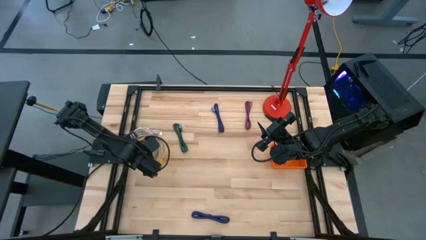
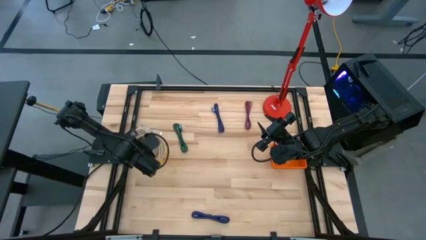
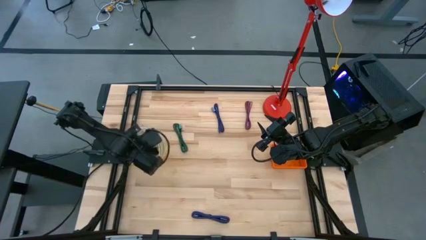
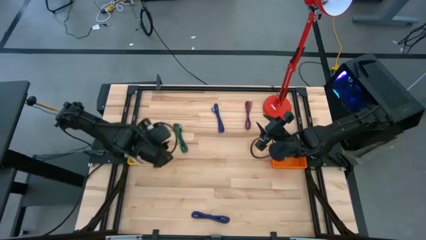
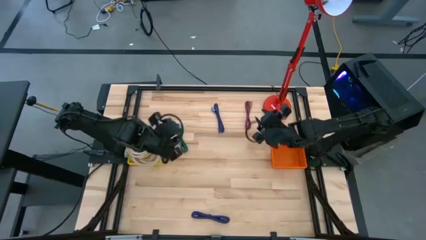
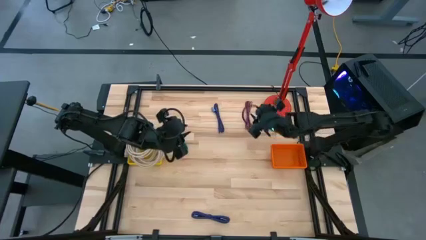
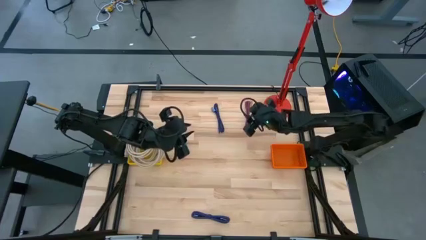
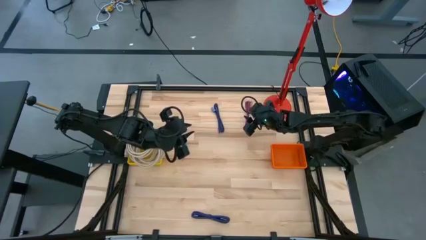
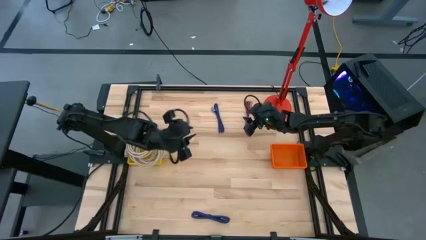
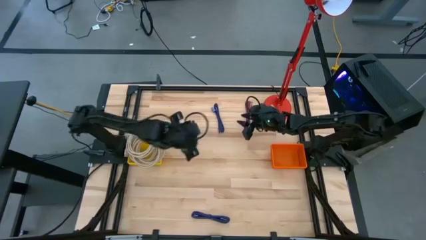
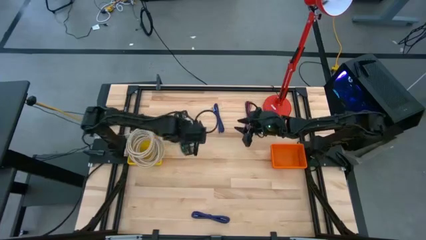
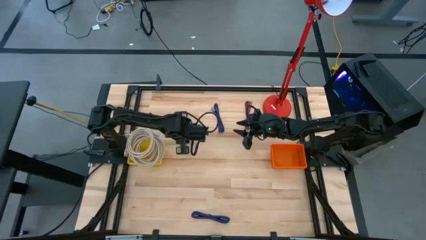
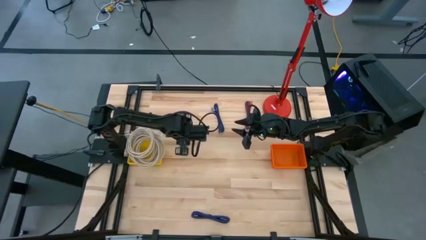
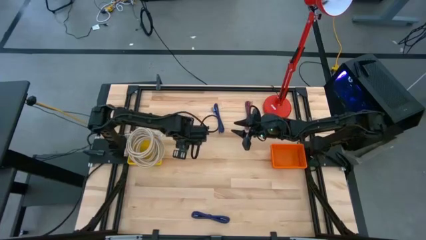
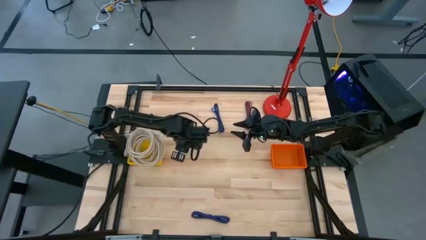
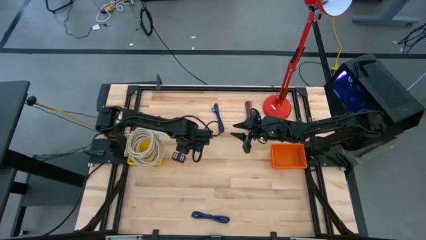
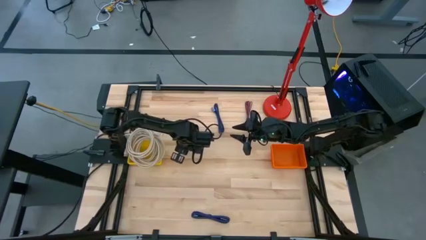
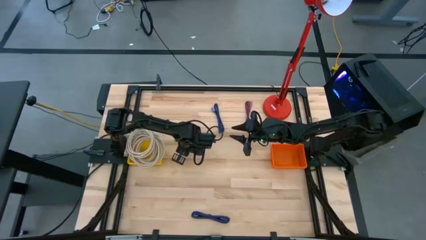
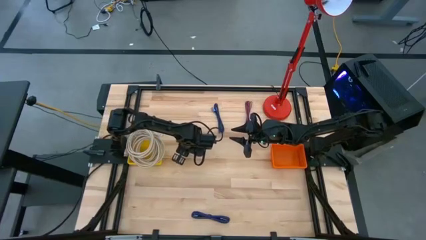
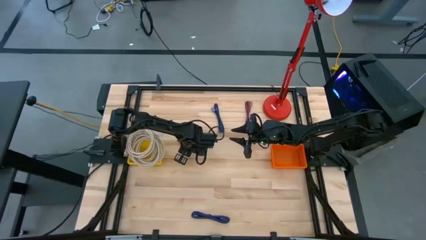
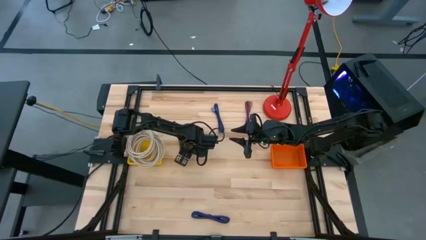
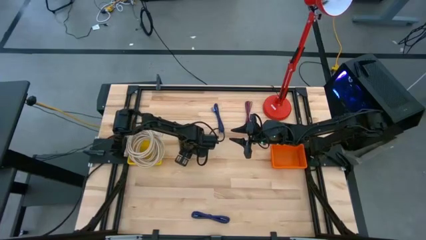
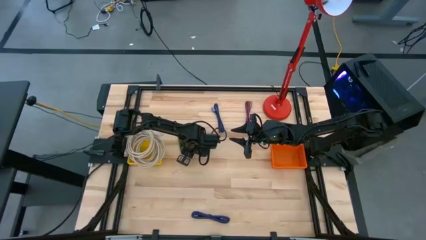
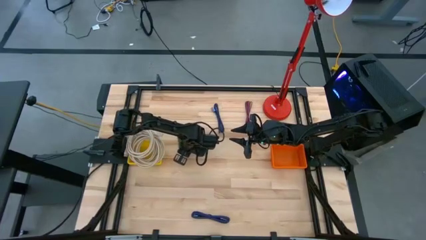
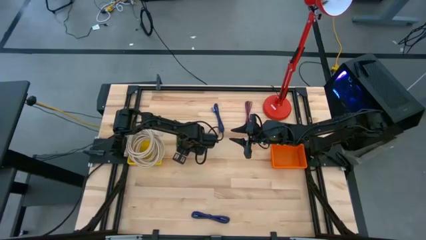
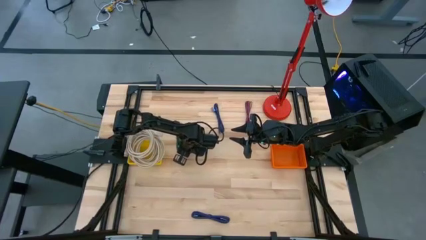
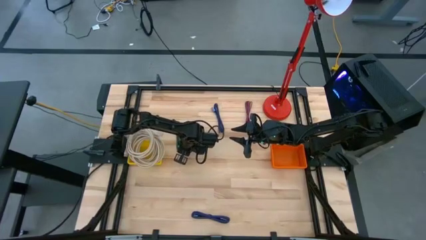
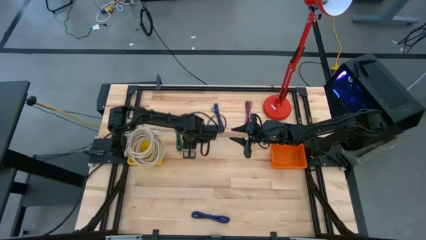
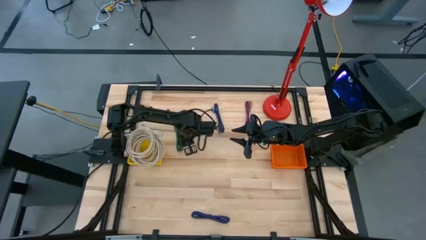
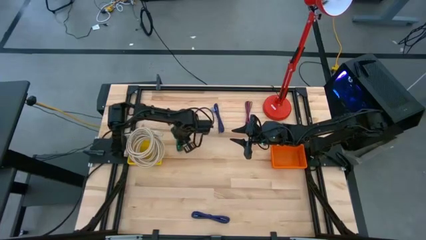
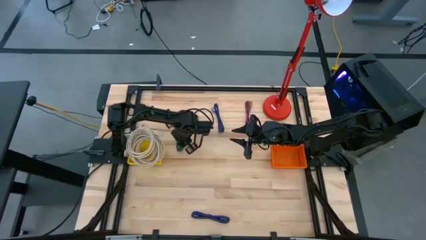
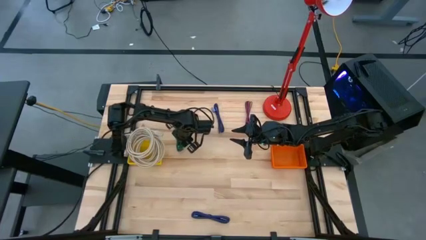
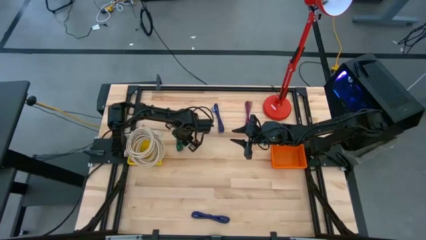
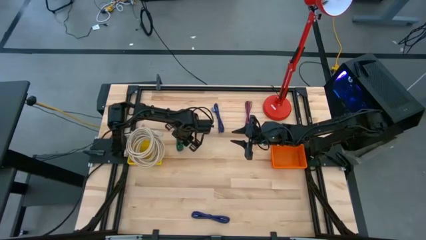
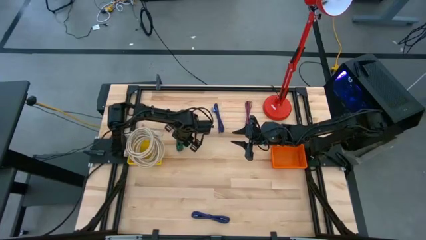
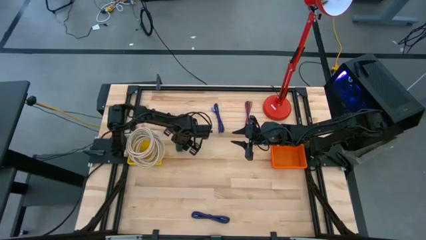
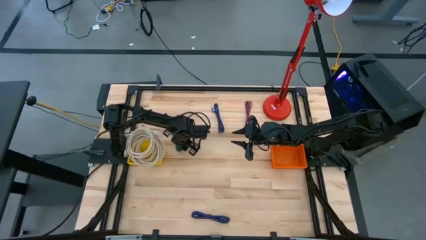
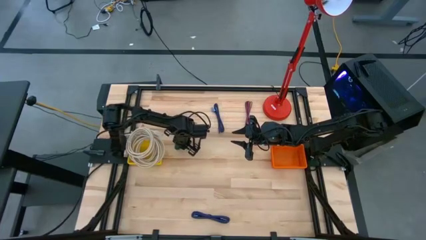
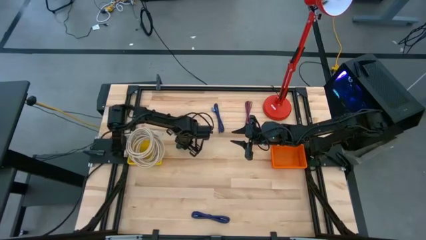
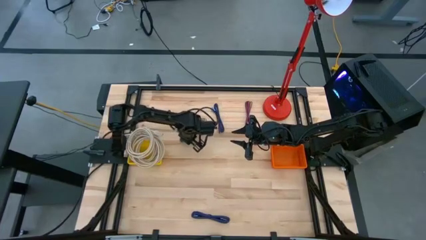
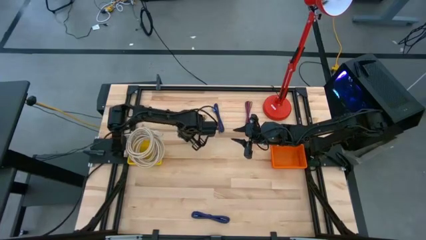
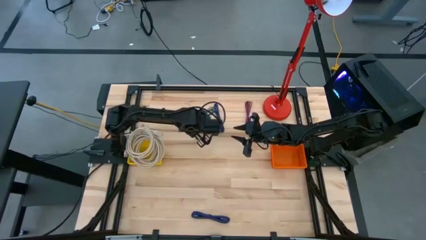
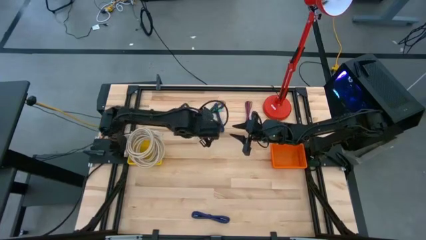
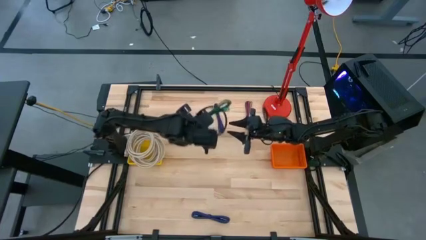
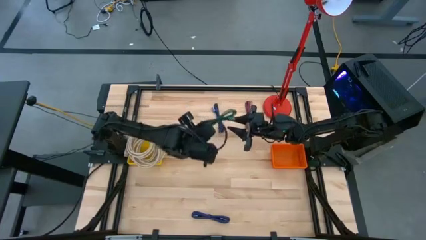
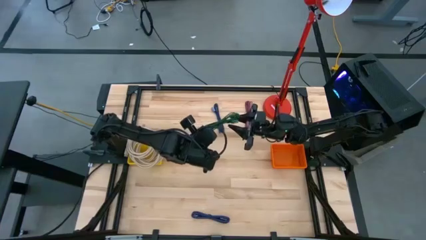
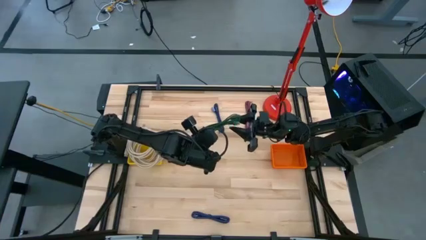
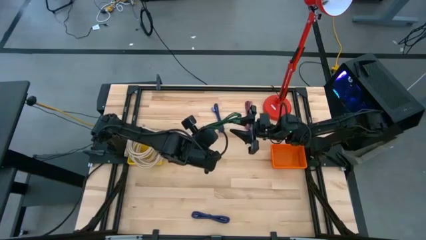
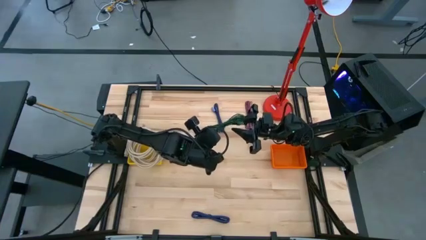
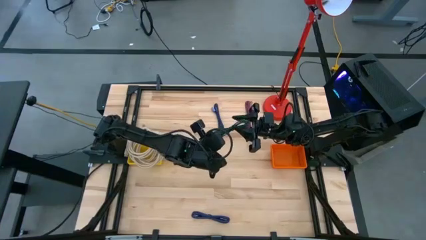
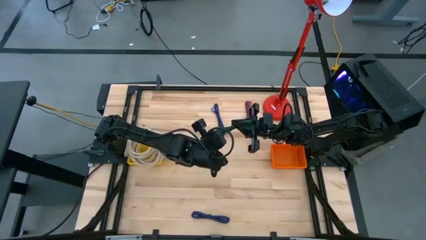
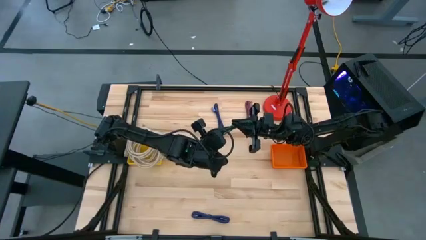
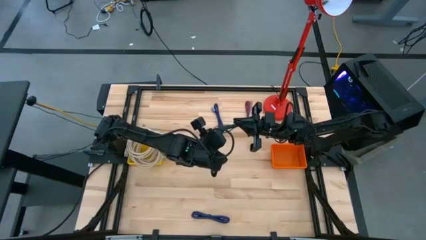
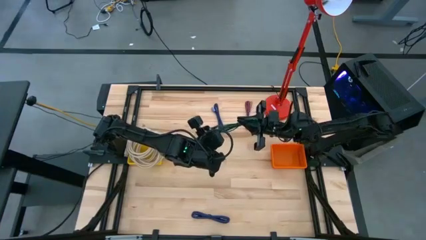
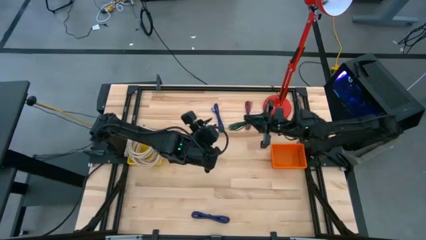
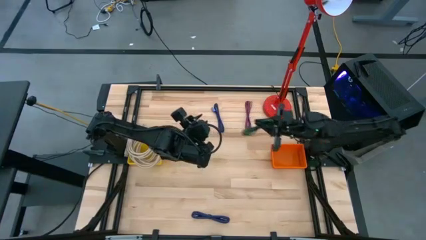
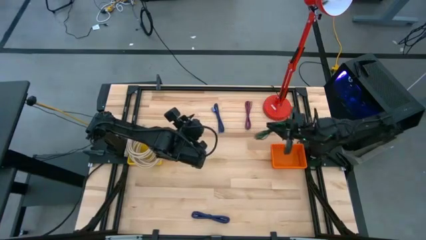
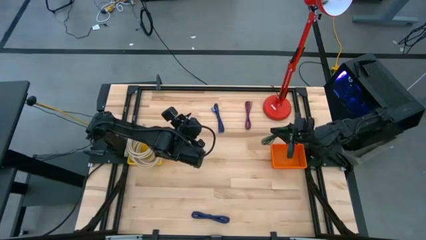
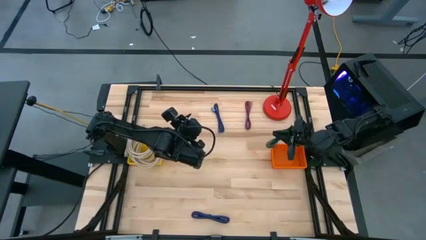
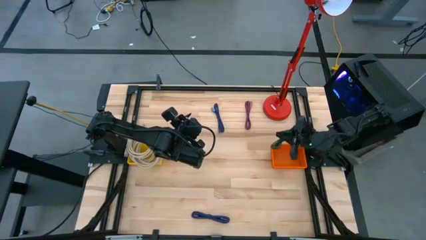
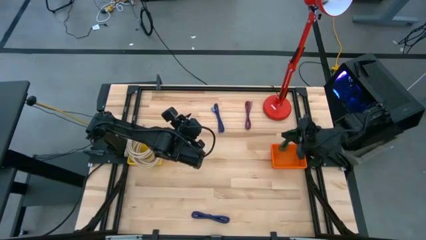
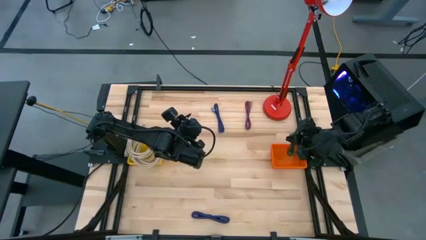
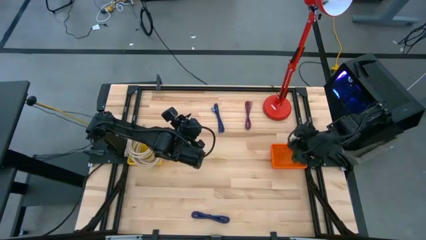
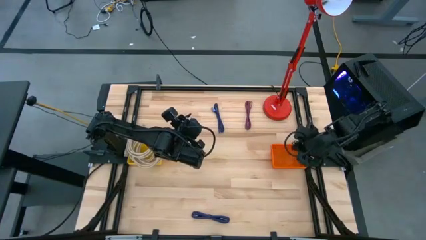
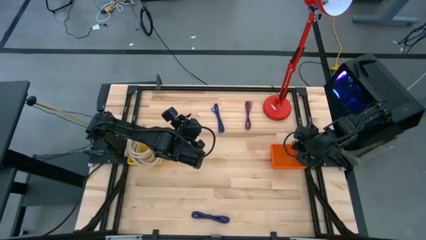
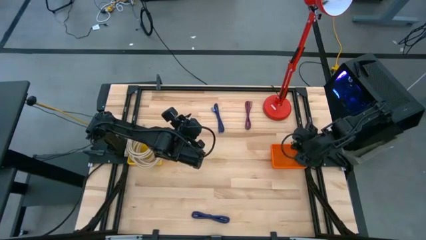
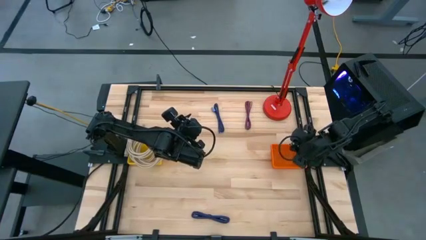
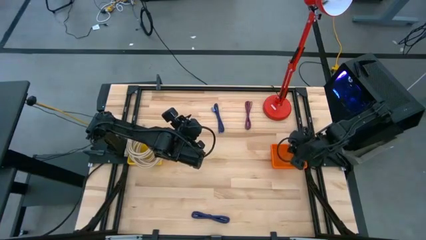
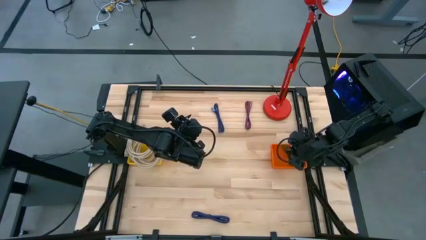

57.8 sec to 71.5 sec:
Task: Pick & Place USB Port
Put the green charger cable into the orange basket
